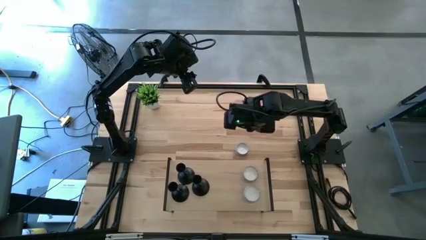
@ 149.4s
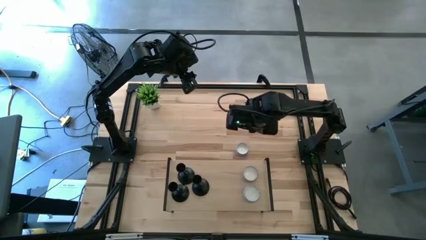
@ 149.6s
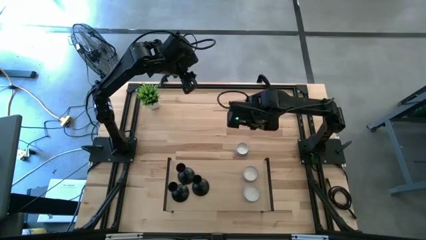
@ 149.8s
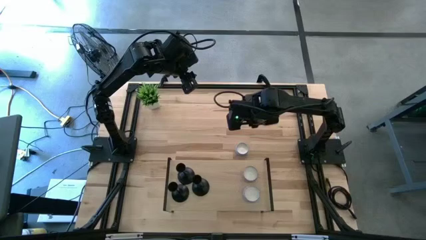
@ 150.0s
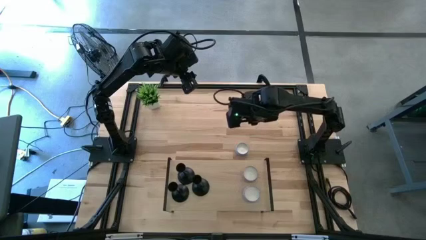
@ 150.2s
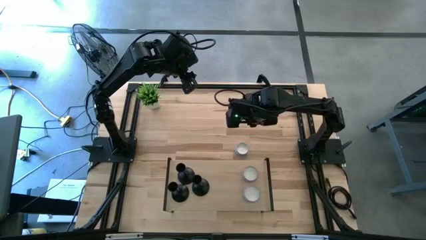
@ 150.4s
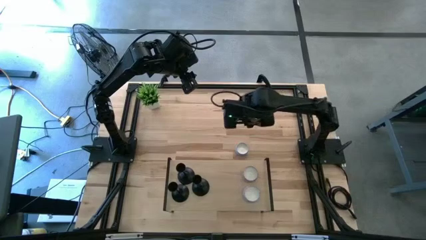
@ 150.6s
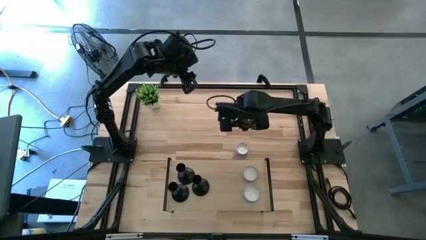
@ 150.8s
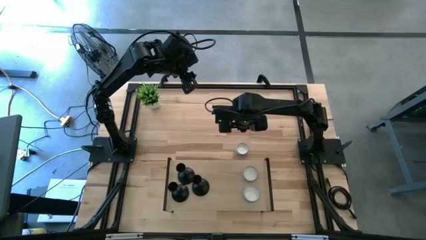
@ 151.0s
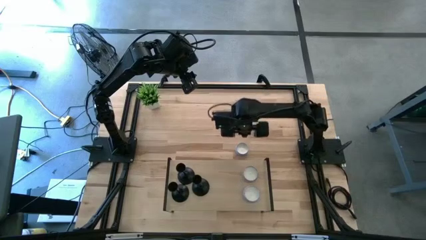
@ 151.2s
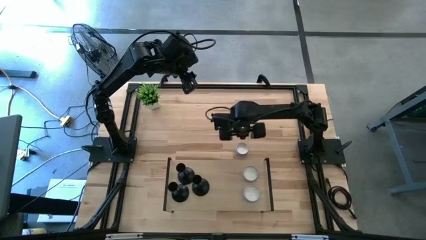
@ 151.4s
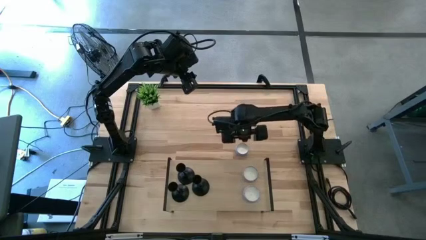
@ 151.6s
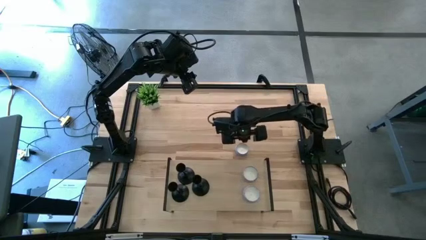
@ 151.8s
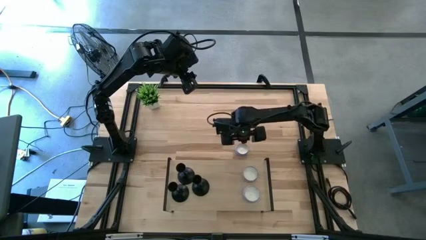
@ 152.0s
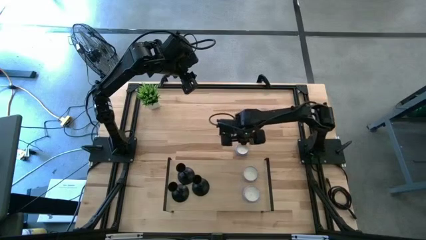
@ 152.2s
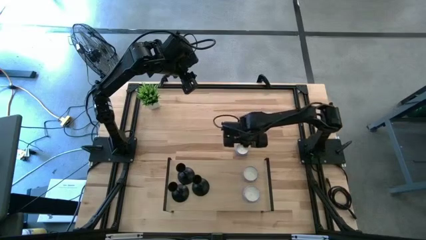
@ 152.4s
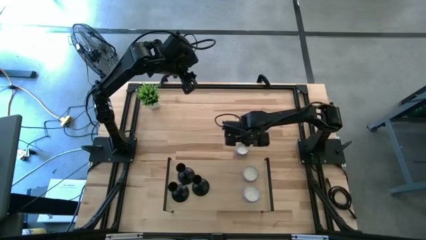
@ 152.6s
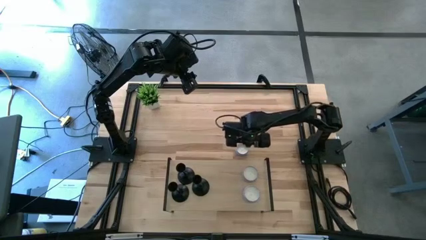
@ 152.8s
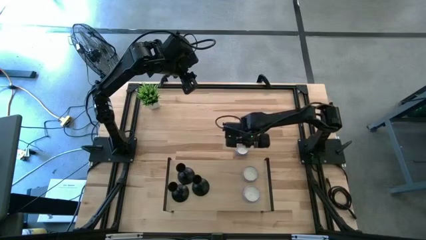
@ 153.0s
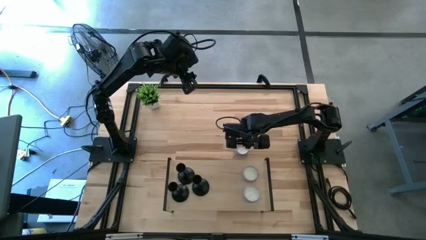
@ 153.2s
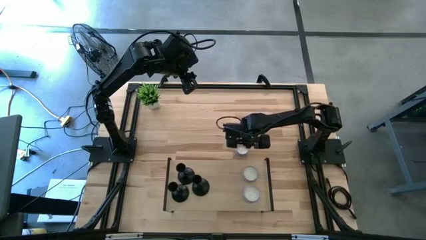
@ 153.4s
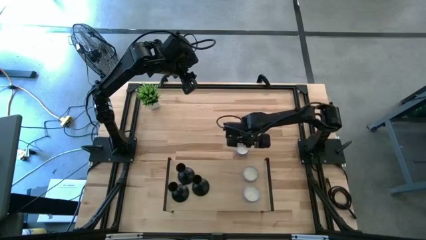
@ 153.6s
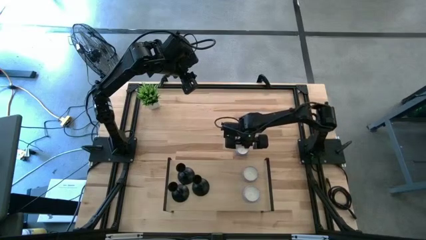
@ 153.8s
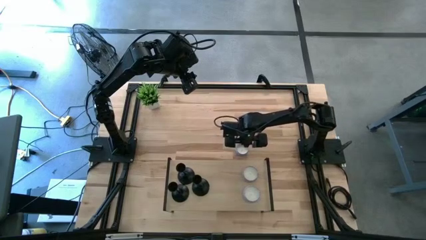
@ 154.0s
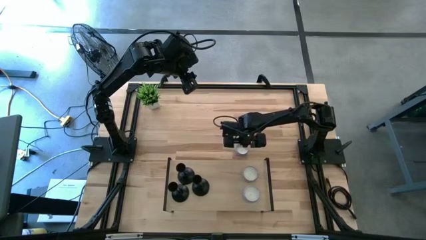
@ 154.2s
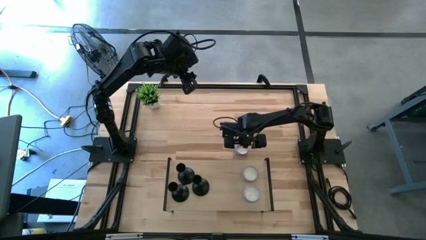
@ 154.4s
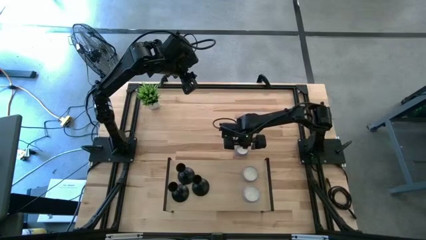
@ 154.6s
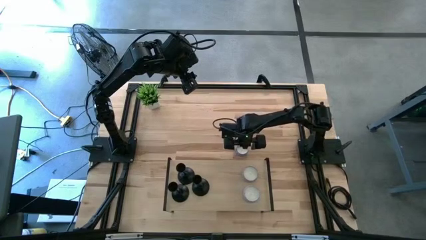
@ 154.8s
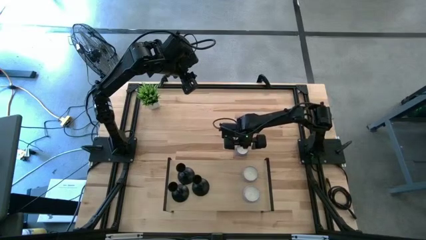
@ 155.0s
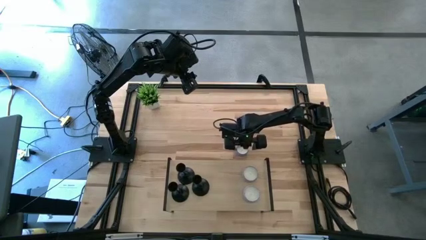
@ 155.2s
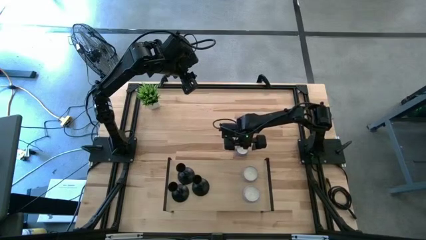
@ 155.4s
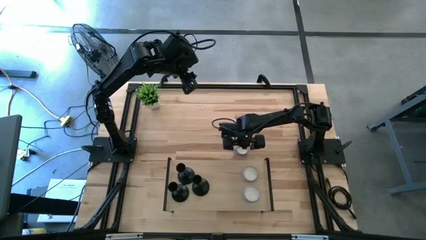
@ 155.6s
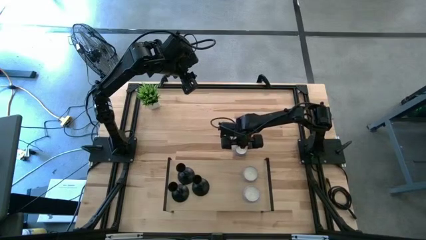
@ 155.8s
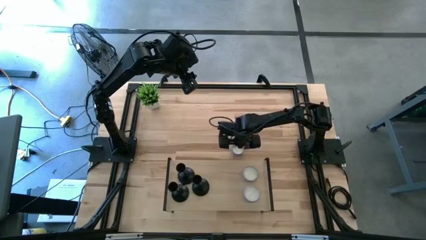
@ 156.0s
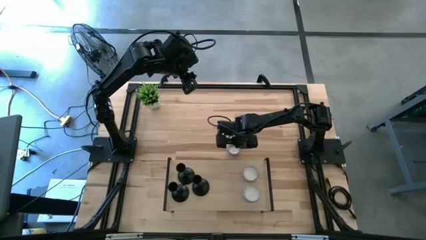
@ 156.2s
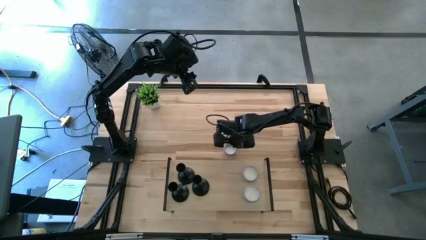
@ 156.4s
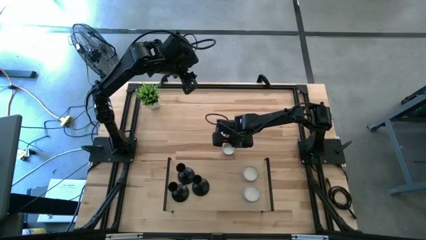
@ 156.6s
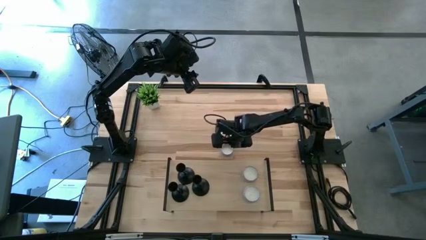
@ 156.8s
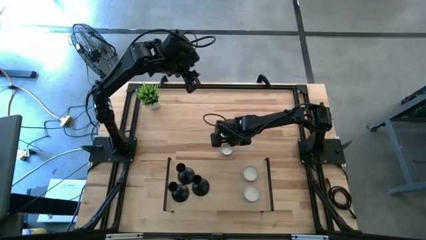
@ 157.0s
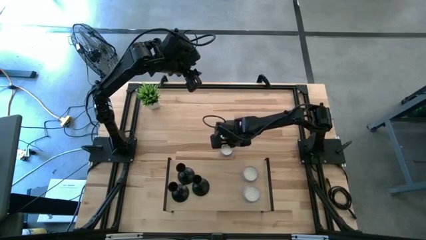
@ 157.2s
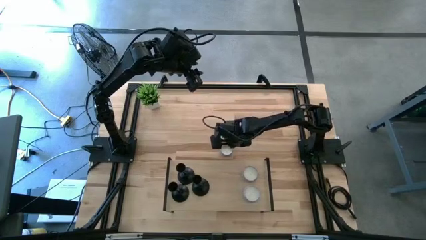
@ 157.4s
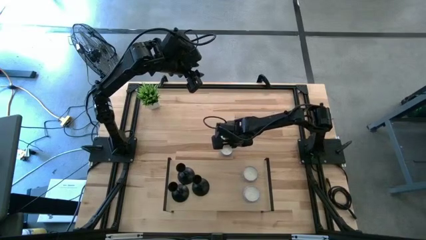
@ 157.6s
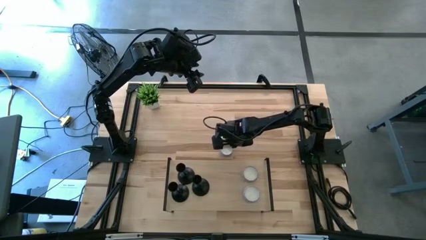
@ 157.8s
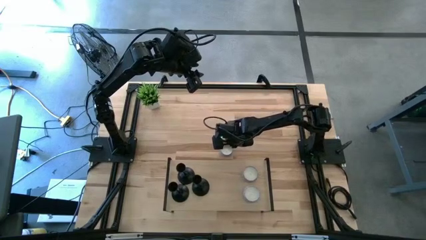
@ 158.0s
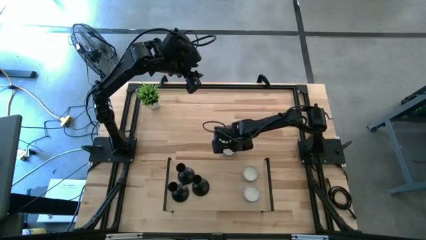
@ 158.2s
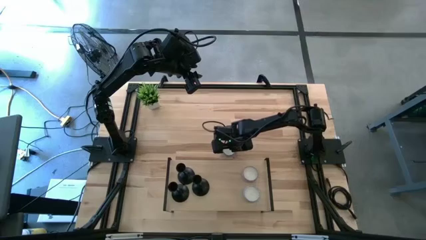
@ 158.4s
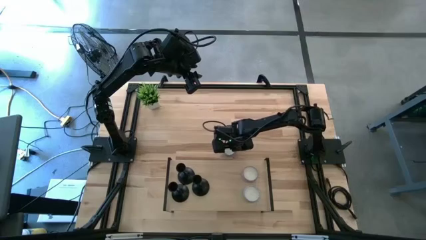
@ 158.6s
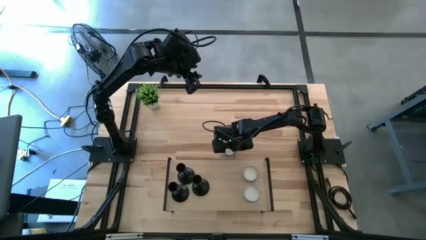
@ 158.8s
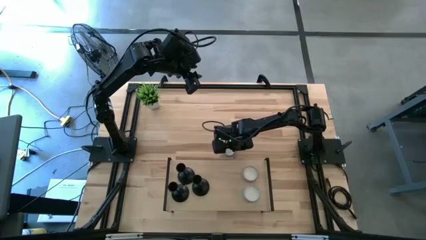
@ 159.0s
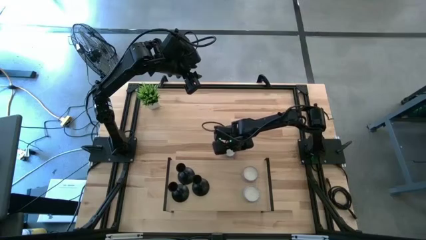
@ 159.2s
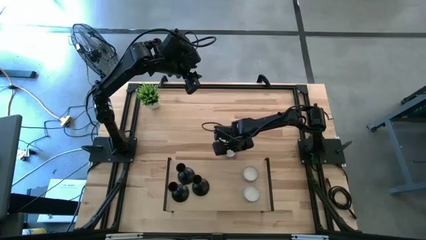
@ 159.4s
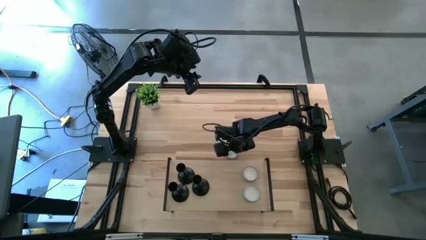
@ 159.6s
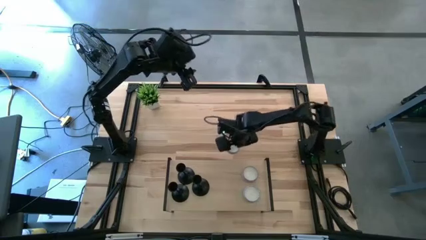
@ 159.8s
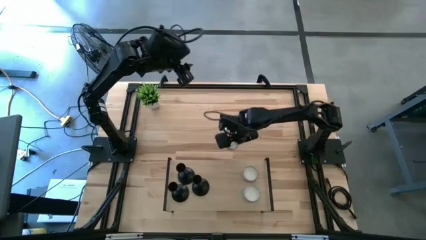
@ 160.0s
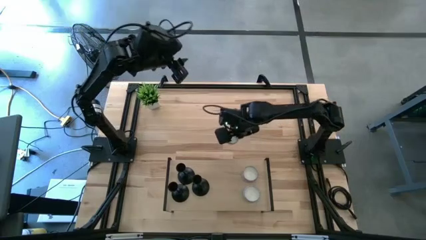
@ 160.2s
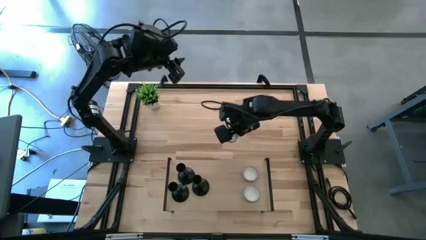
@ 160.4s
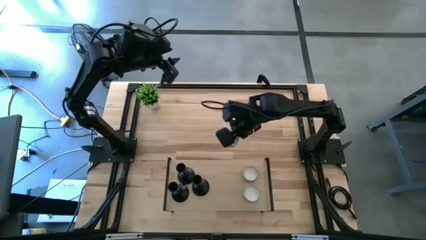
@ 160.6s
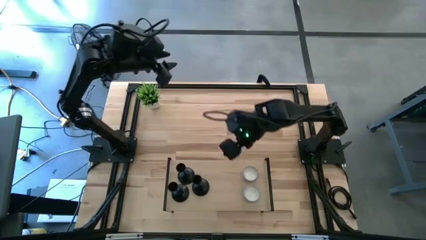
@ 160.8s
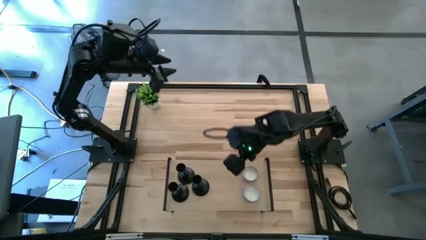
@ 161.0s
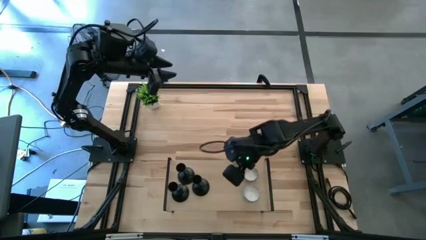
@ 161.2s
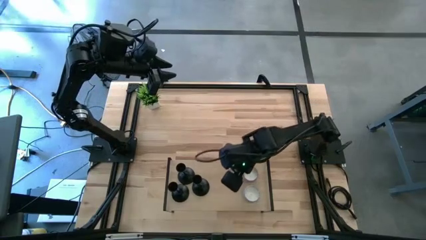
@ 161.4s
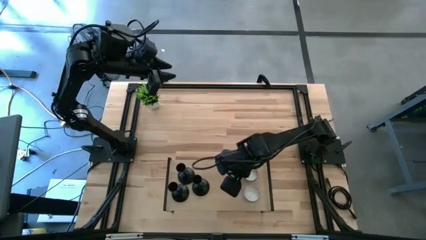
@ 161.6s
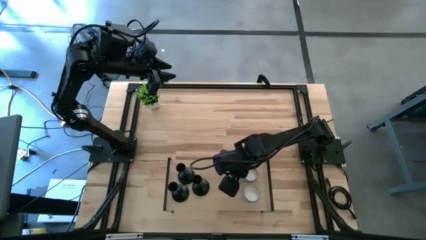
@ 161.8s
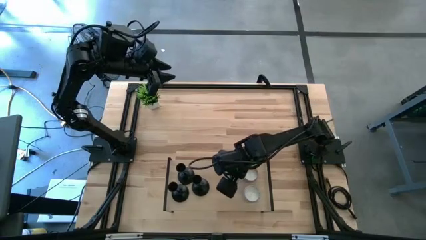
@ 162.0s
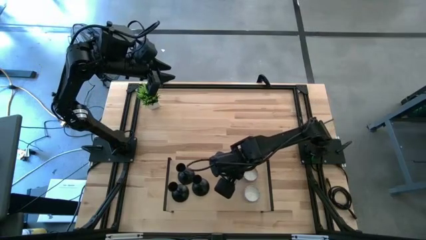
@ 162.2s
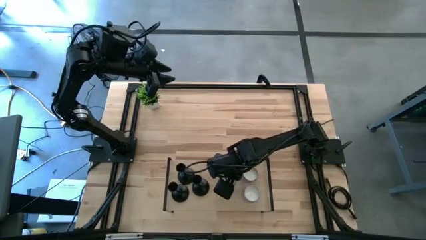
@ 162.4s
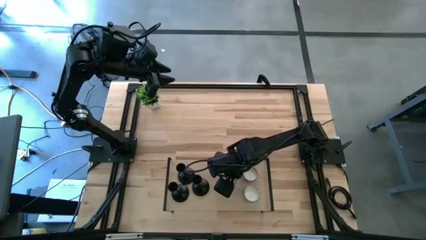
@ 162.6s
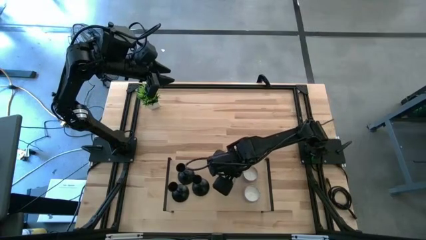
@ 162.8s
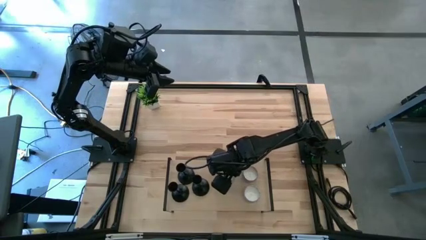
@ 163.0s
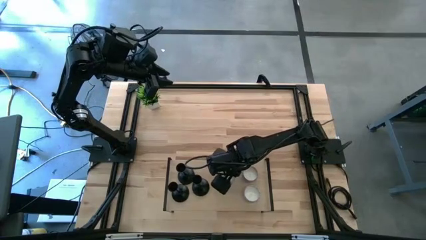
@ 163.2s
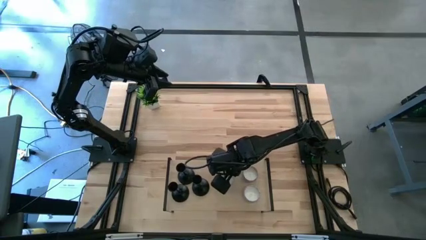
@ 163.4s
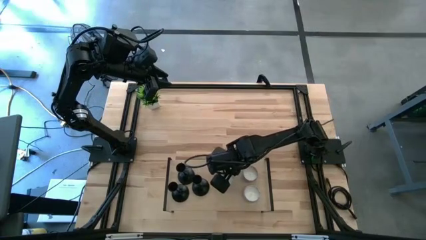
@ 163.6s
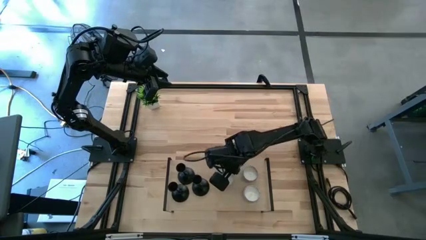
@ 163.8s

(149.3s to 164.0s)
Task: Pick & Place candle stick holders
Put the blue scented candle on the shelf
